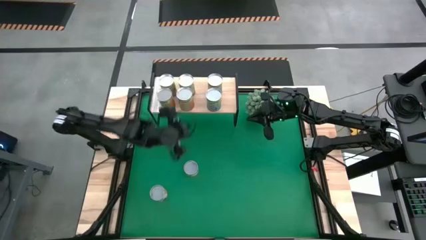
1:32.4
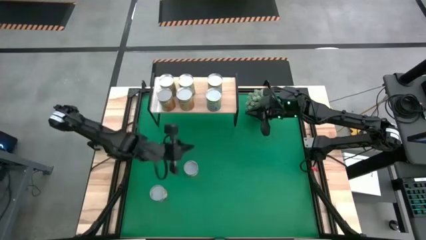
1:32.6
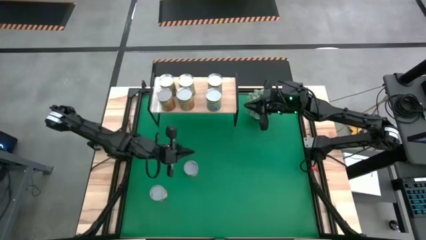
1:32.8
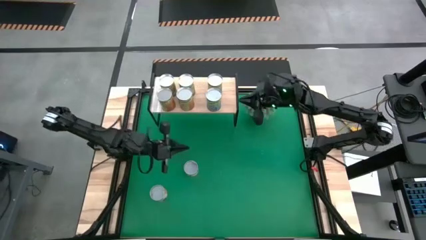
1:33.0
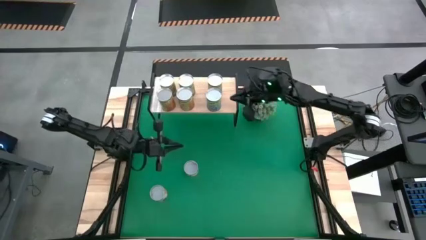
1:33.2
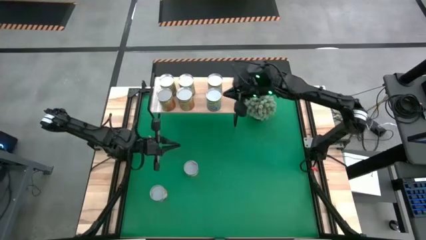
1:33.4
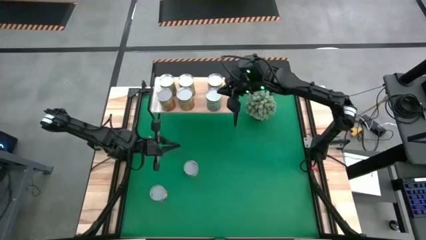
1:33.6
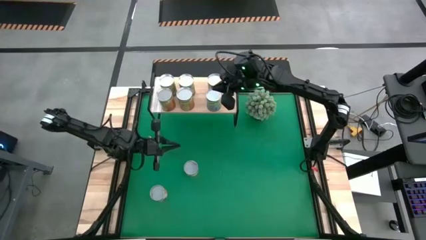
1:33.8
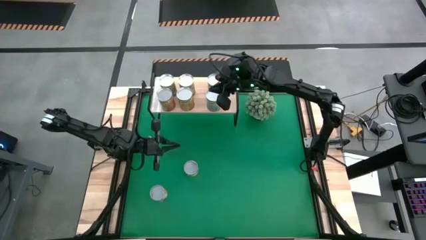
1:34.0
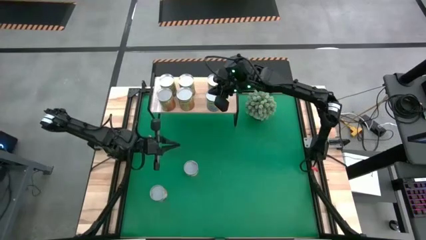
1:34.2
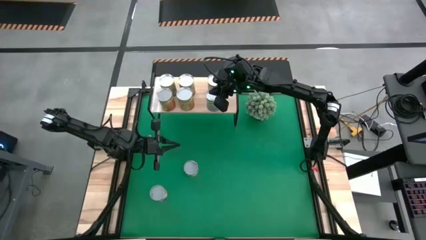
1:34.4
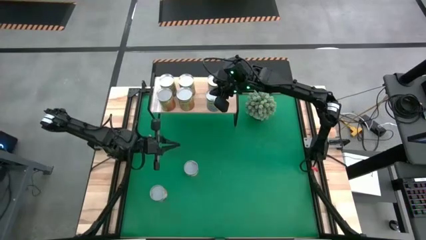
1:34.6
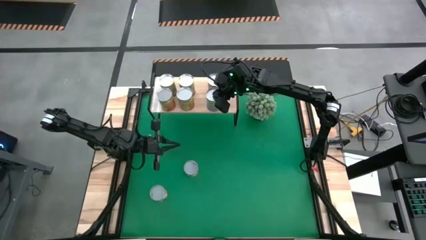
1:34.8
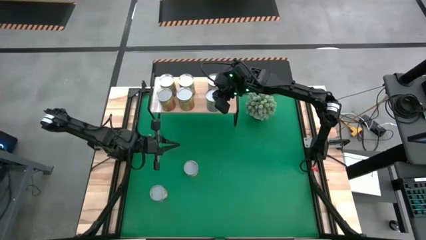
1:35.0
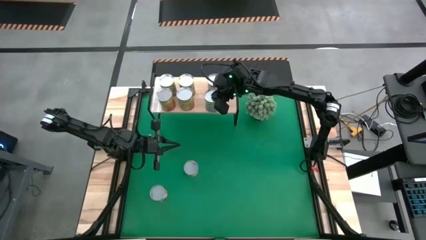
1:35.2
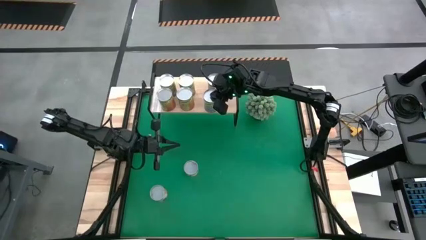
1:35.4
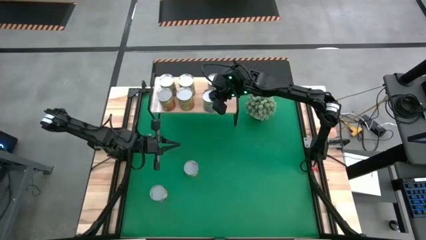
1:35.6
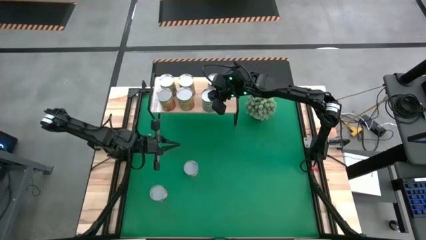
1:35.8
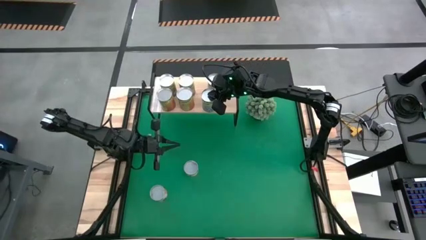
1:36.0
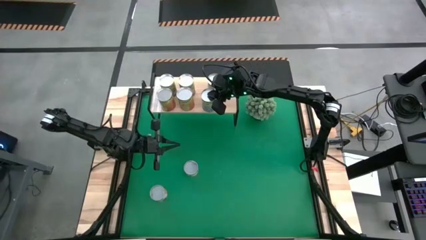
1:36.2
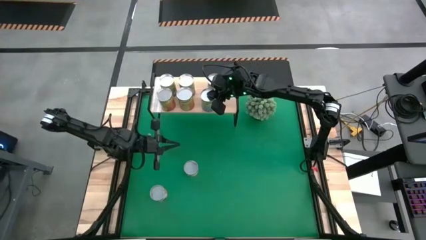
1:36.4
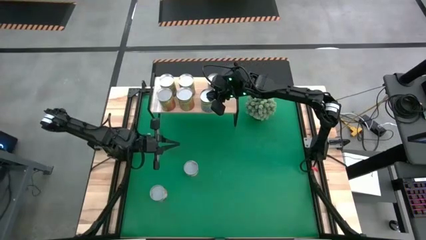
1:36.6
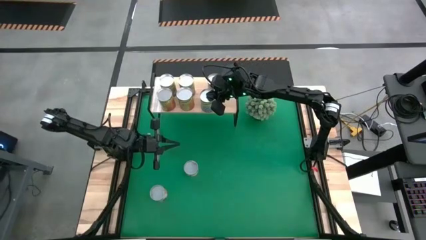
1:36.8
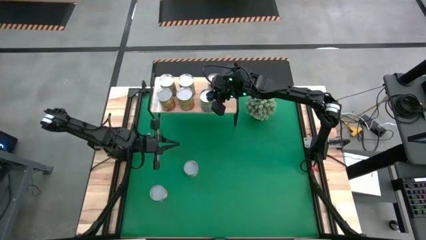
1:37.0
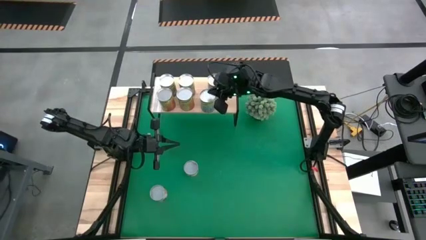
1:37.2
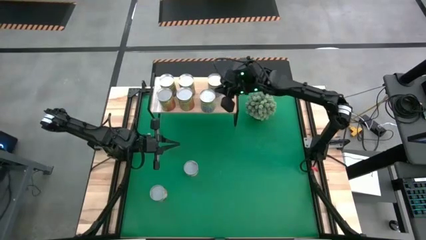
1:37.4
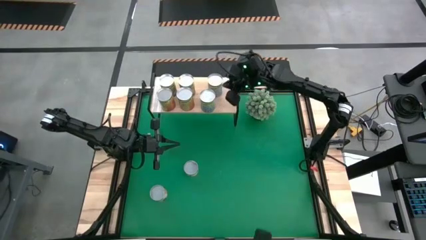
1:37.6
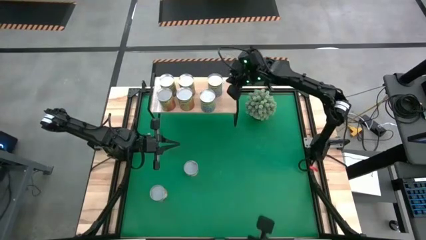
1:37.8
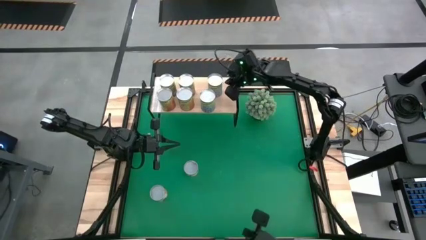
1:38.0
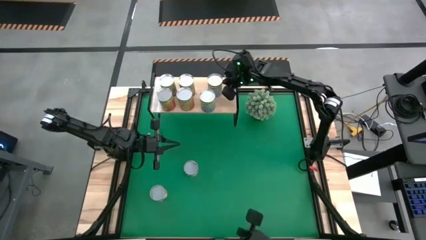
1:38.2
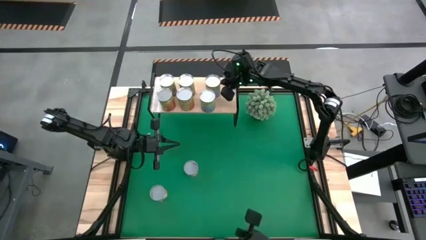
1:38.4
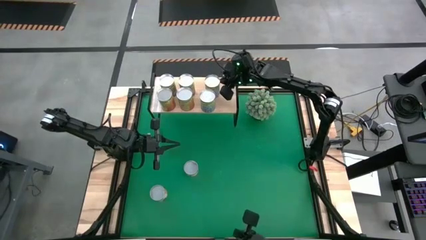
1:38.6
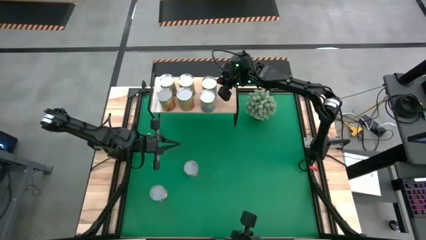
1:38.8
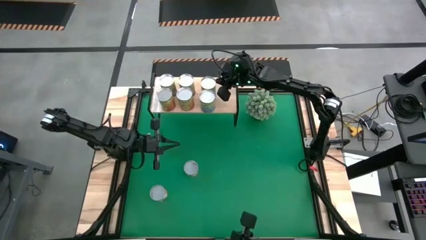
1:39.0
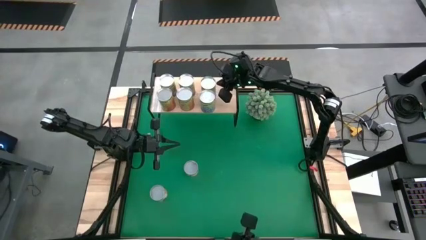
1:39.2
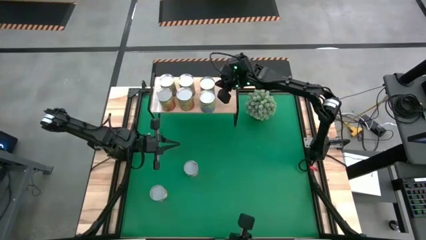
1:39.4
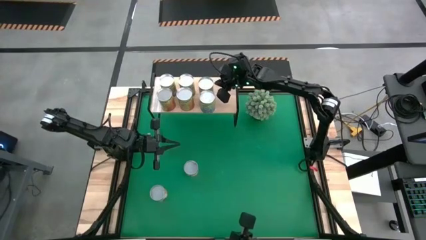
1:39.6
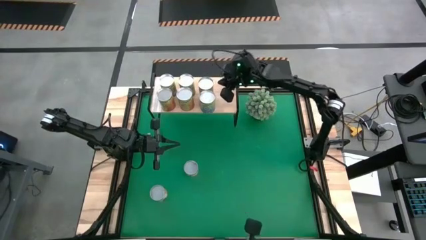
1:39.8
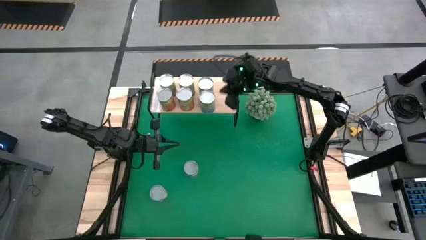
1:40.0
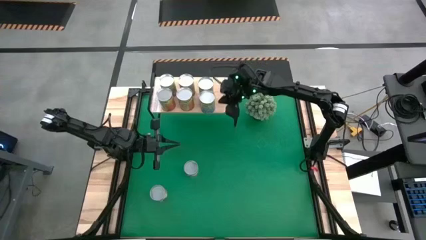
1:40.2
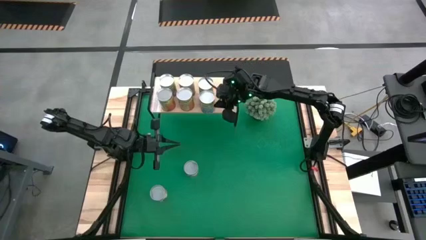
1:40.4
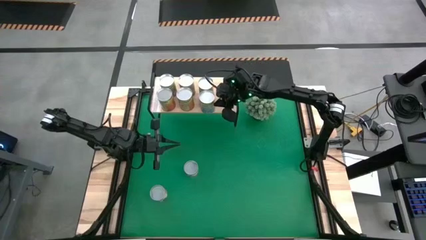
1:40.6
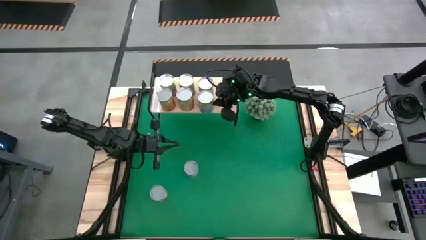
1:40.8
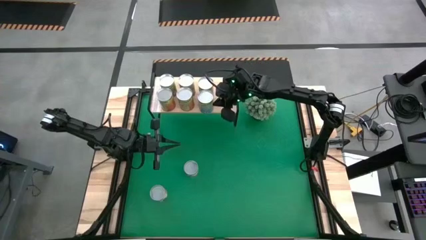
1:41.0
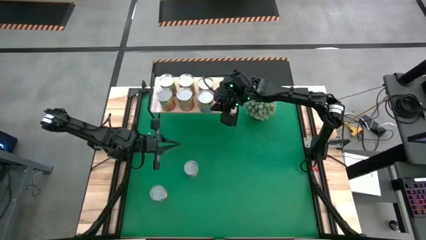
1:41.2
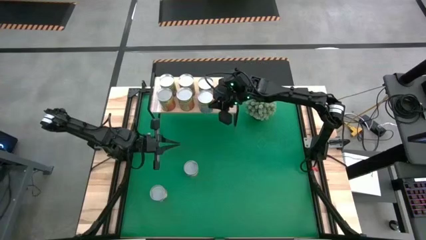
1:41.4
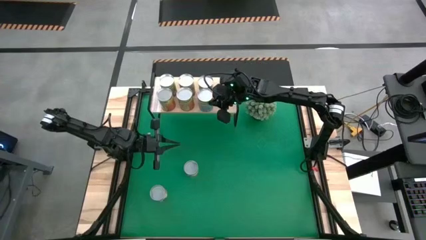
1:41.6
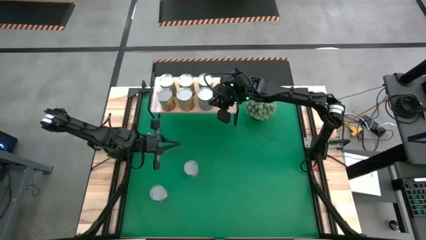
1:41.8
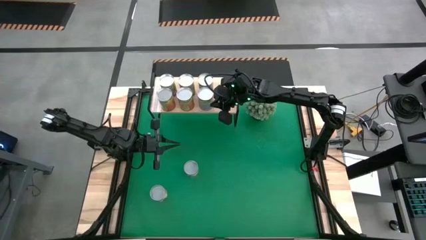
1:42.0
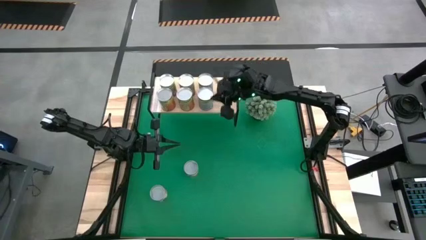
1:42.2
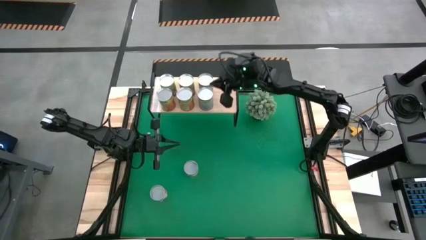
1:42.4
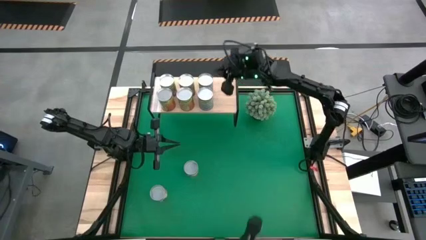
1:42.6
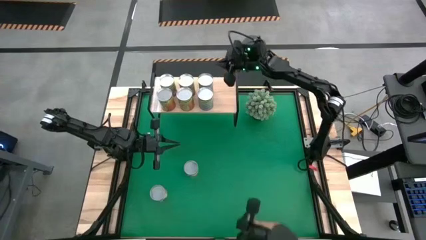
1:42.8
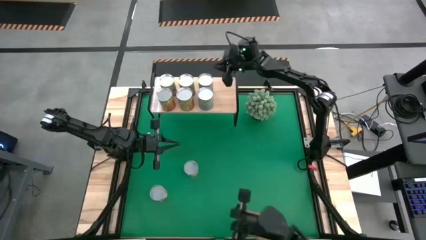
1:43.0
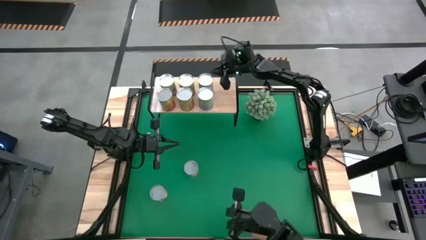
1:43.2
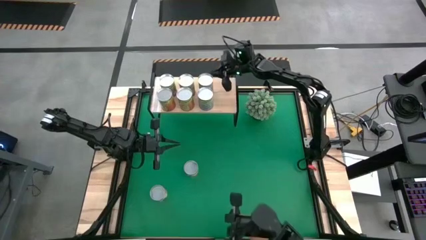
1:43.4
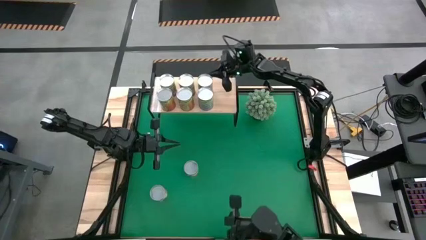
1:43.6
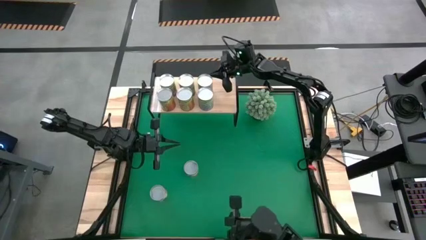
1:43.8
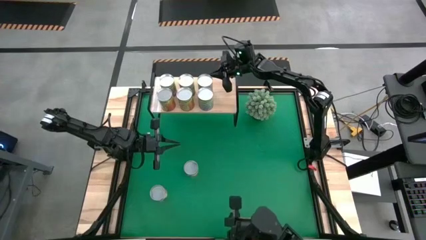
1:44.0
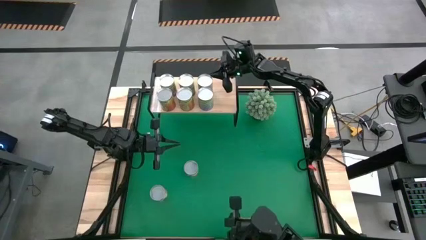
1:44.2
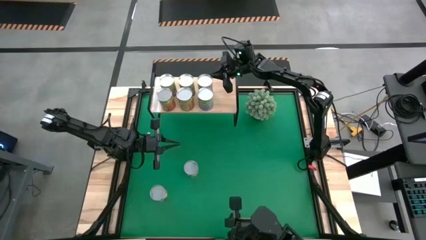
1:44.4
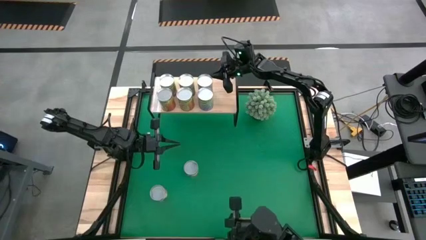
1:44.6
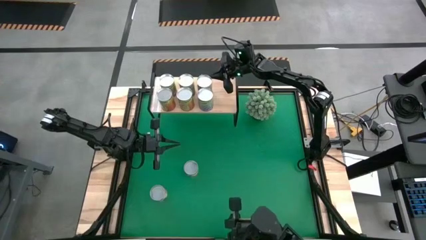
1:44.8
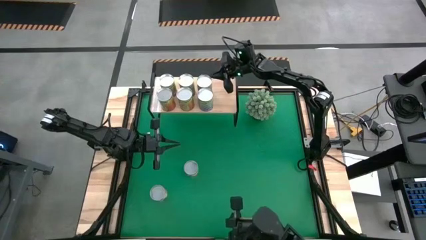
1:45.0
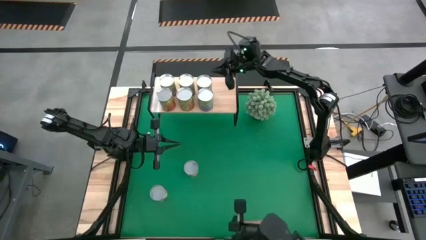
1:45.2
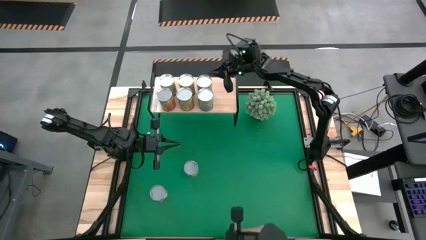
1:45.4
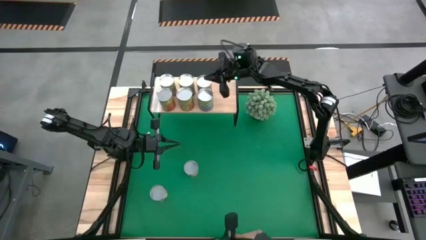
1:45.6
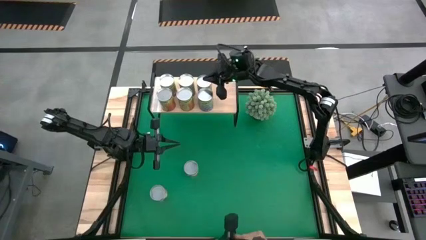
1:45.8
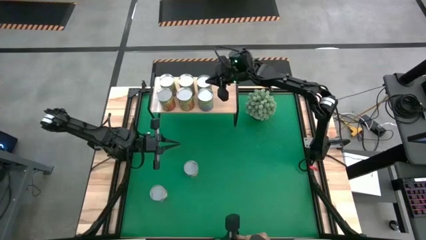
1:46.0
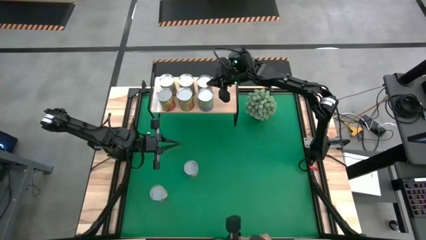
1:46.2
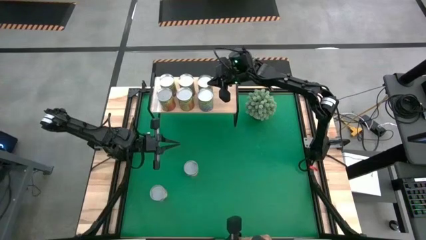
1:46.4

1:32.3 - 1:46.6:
Task: Pick and place cans onto a shelf
Adjust the canned goods on the shelf

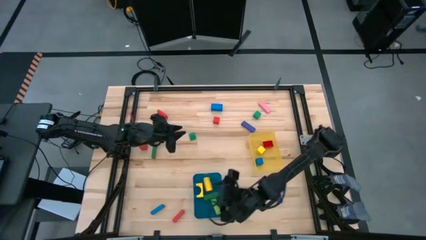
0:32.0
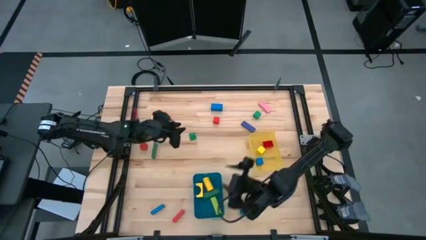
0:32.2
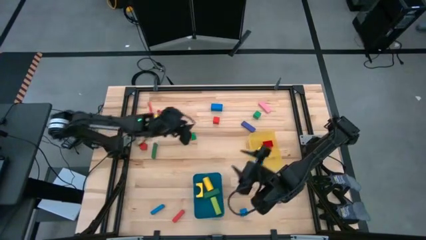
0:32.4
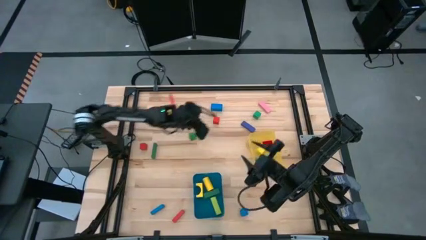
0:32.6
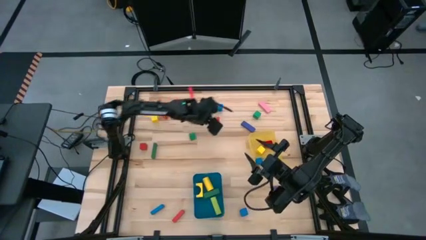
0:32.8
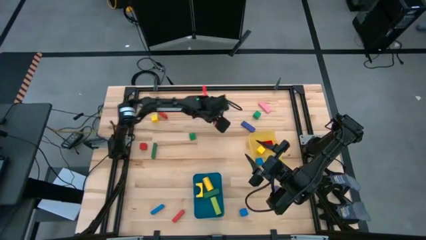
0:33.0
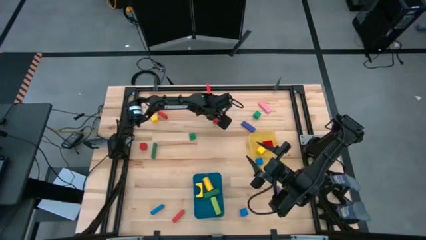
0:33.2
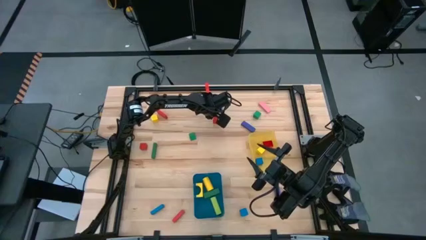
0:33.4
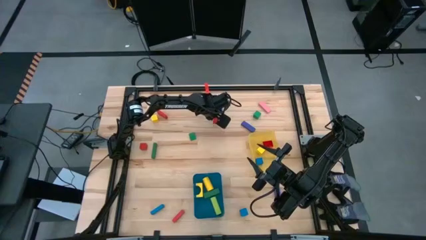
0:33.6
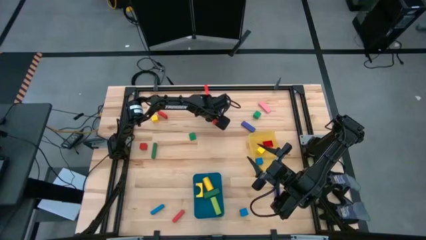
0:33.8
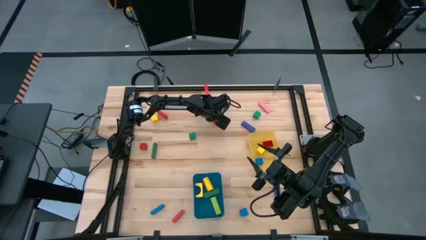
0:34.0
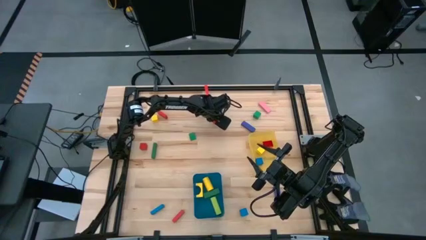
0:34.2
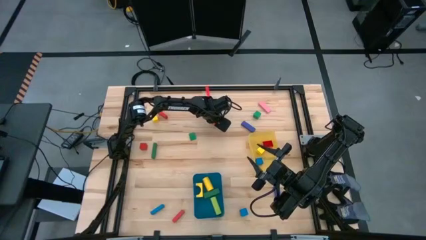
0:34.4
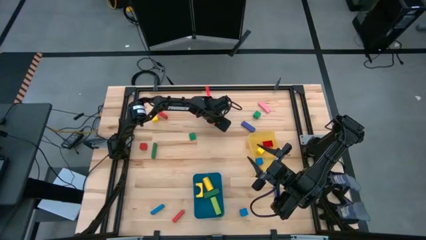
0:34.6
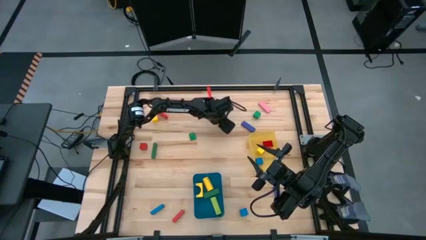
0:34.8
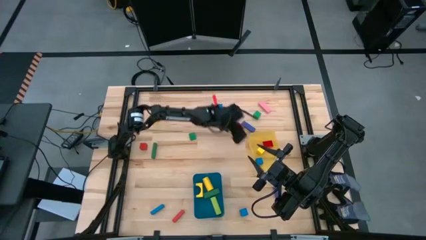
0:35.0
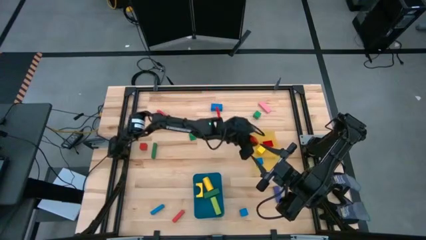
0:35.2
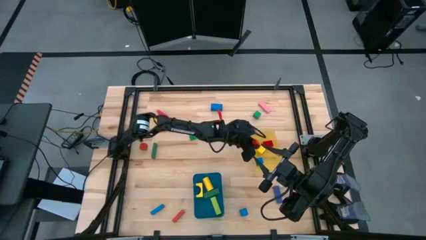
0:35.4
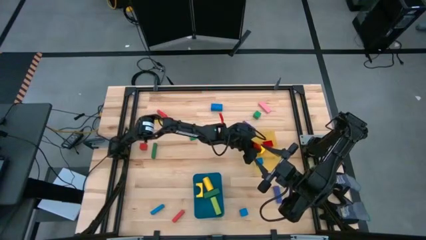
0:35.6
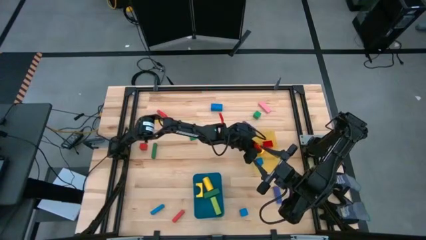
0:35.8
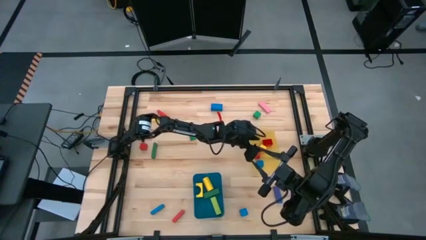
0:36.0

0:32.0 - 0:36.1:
Task: Sort blocks by size
Put the small red block into the yellow bin
